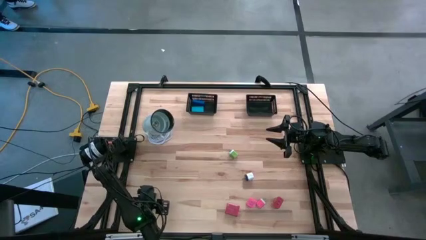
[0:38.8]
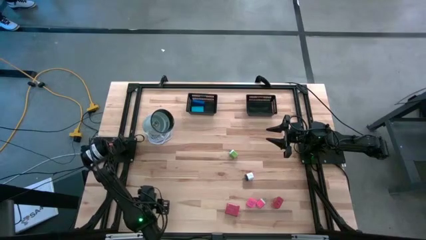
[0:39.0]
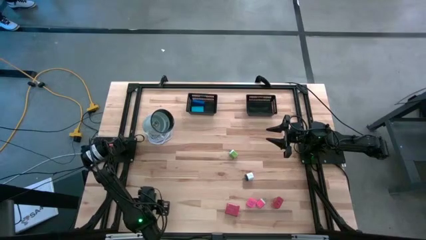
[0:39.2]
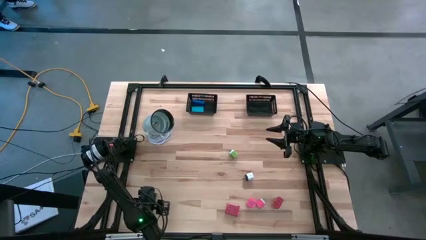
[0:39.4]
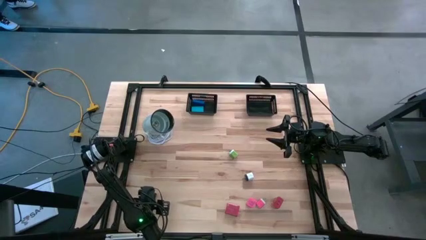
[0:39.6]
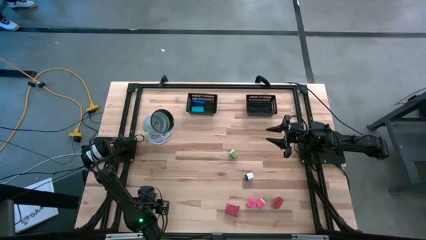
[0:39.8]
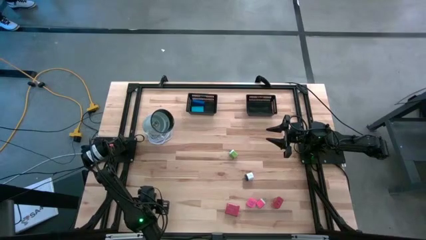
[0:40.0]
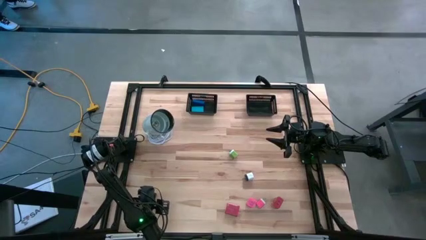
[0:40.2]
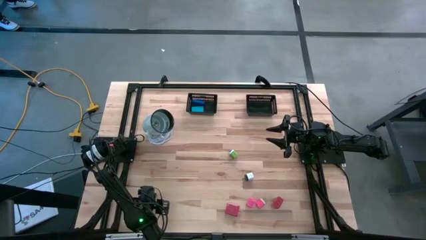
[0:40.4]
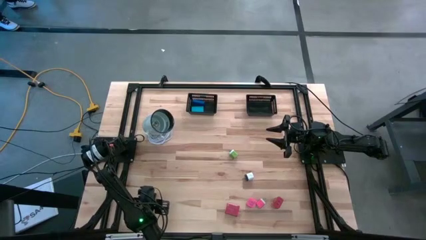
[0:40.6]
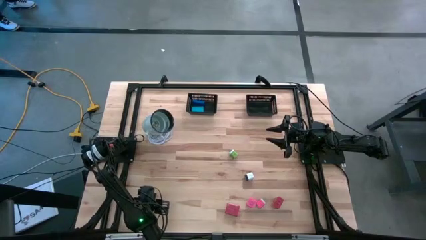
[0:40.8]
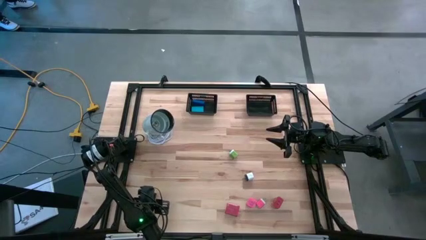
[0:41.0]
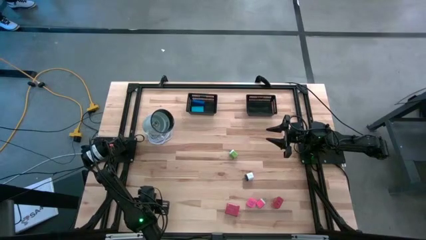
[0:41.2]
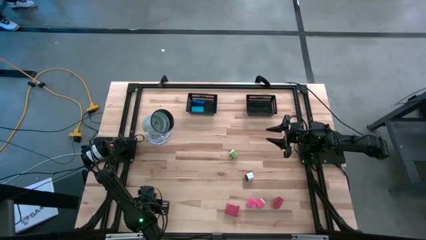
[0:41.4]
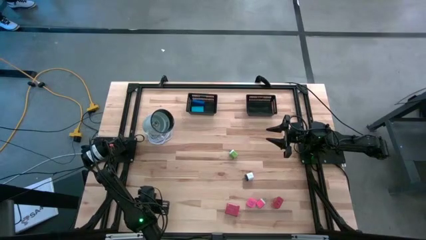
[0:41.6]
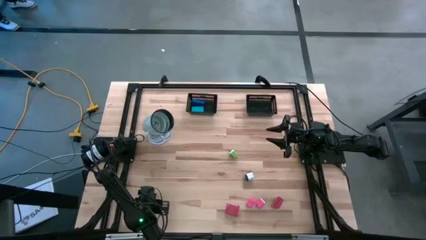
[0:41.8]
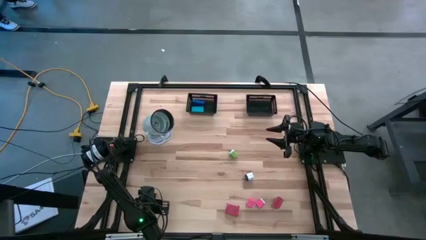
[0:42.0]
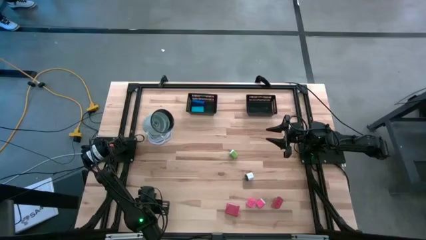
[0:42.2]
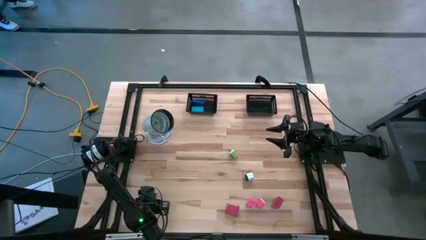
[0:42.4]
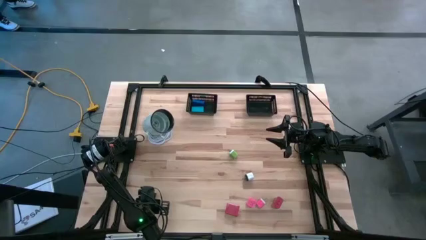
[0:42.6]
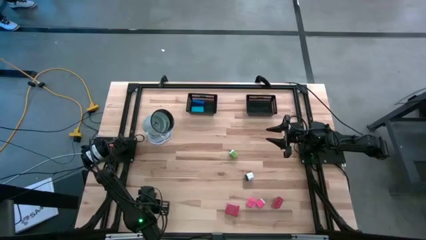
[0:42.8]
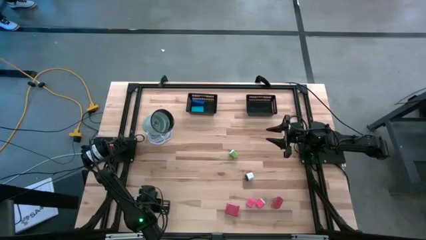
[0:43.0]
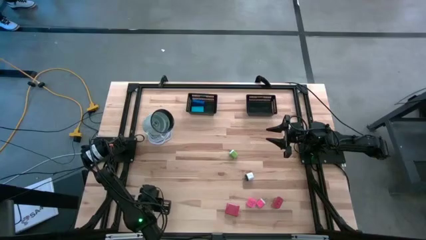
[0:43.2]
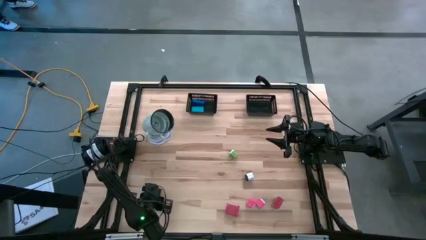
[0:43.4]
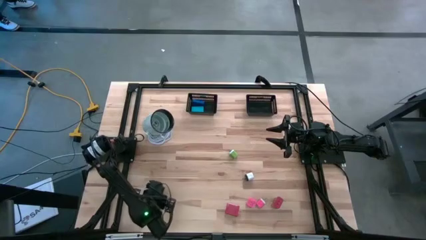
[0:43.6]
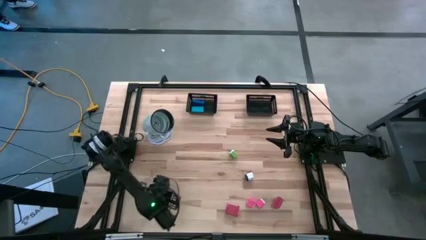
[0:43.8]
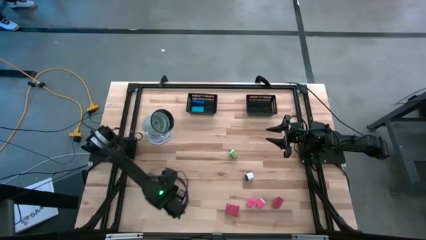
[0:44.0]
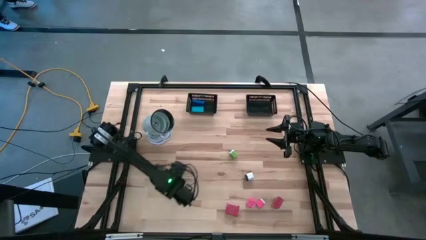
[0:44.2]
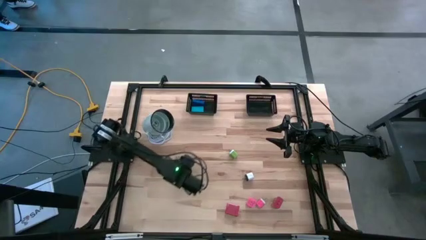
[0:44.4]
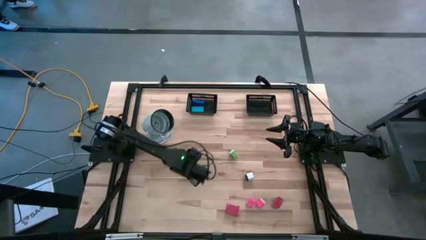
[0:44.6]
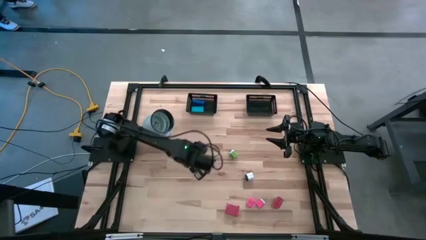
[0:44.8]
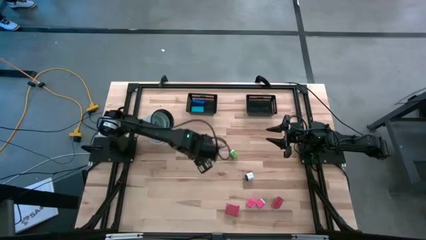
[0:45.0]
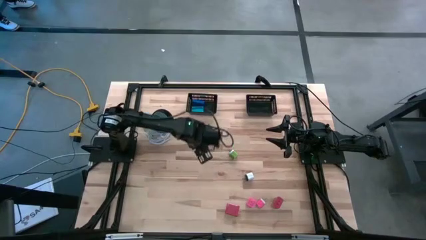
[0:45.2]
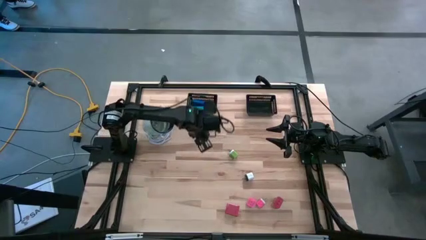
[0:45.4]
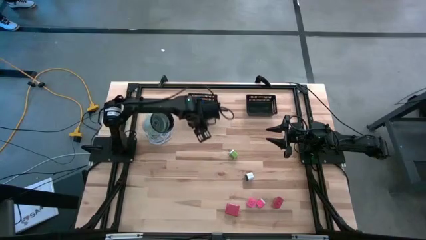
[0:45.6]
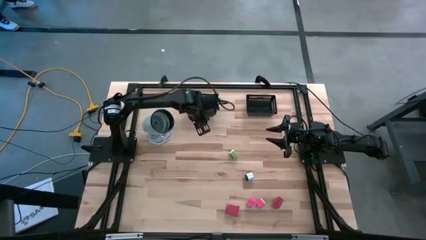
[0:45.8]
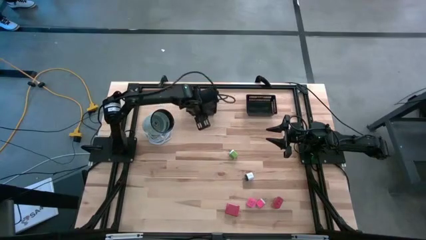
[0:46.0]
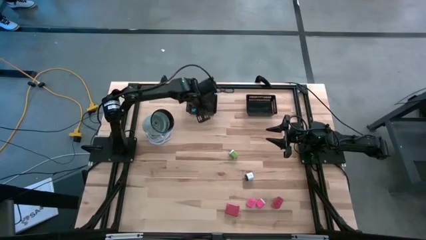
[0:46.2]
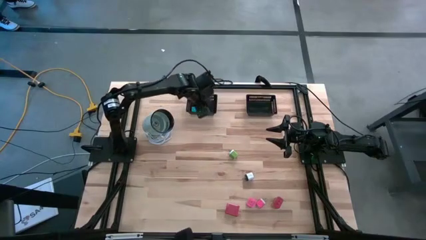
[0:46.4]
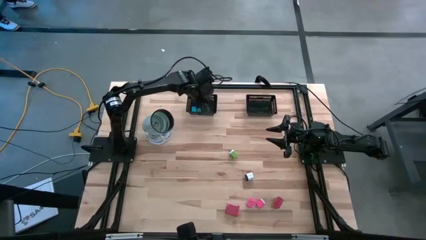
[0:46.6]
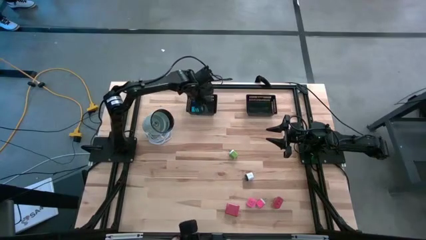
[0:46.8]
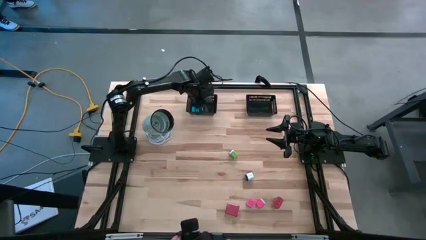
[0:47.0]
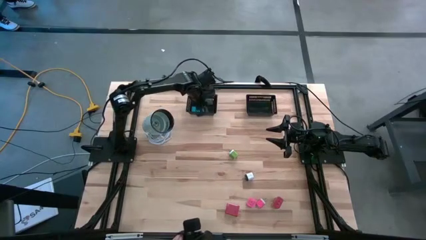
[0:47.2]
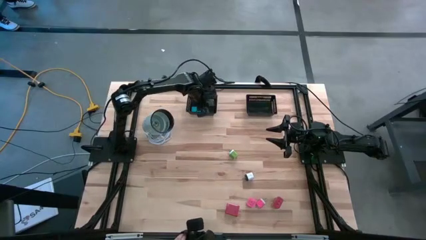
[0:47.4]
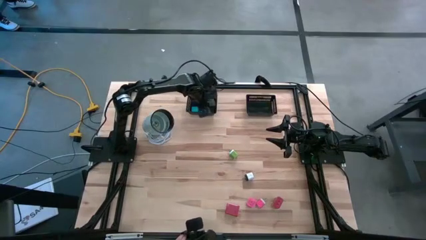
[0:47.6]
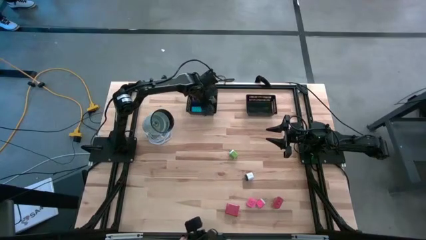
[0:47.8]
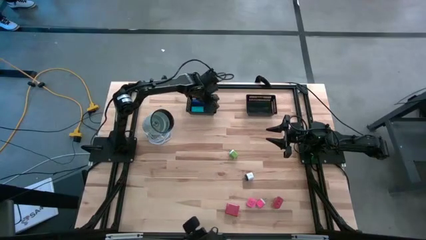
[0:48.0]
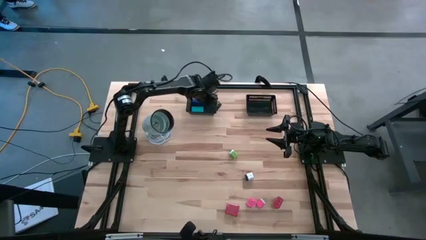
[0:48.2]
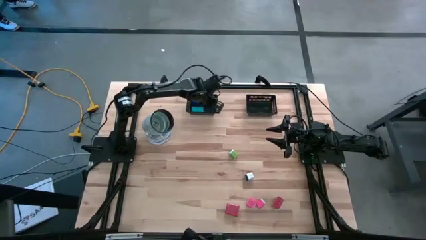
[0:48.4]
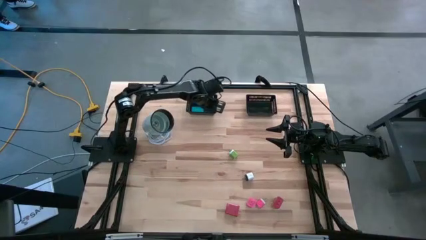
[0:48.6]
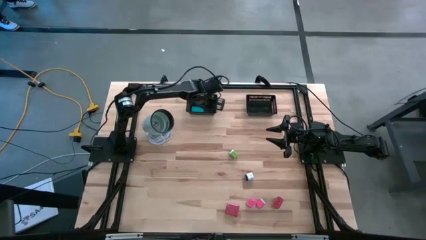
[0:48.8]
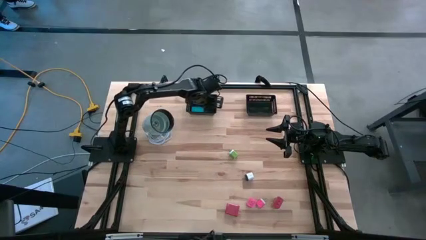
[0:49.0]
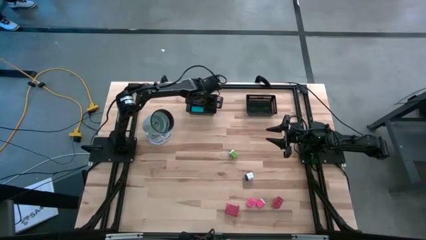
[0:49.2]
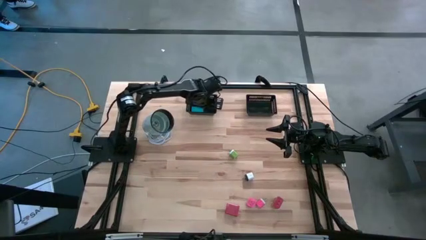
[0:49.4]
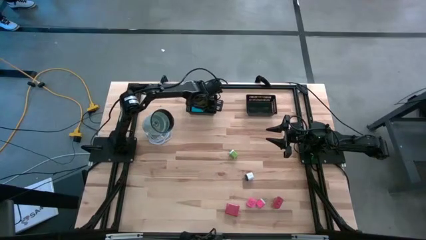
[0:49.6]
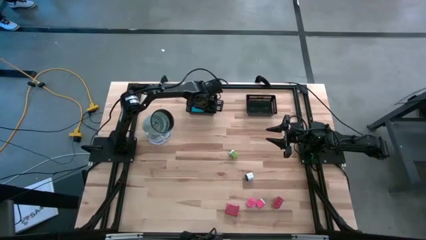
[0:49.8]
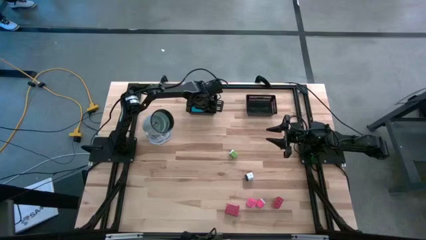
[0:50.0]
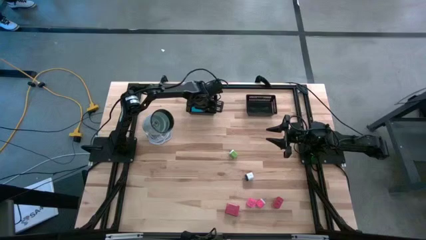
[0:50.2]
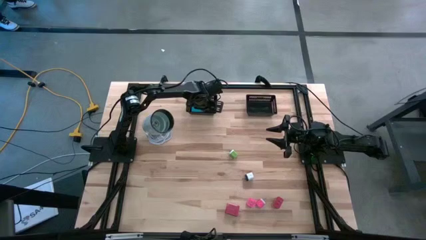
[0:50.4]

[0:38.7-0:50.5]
Task: Pick & Place Office items
Put the black digital clock into the left black bin

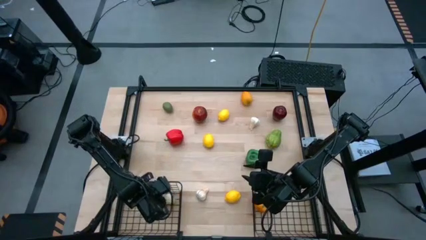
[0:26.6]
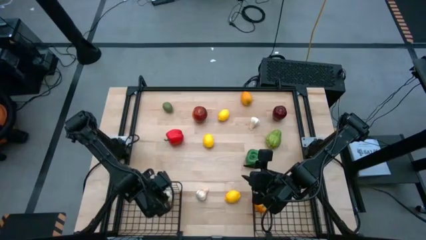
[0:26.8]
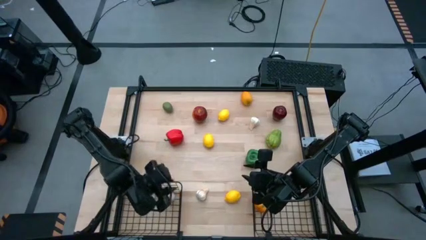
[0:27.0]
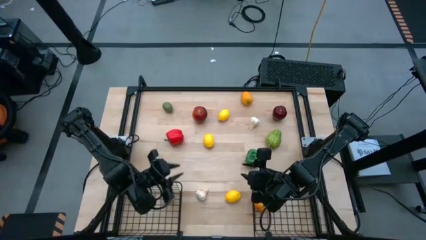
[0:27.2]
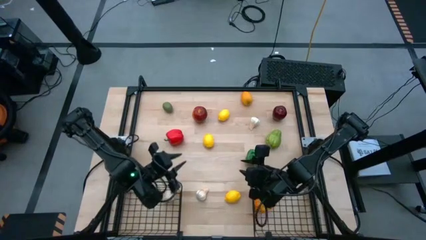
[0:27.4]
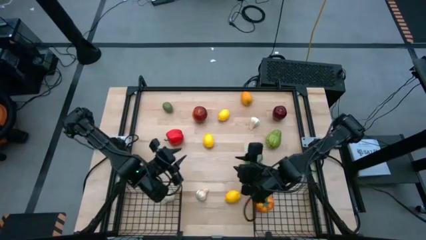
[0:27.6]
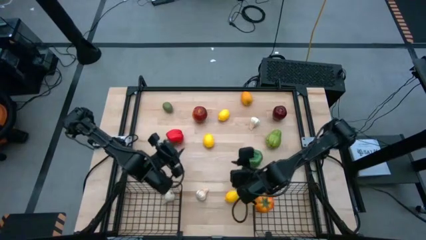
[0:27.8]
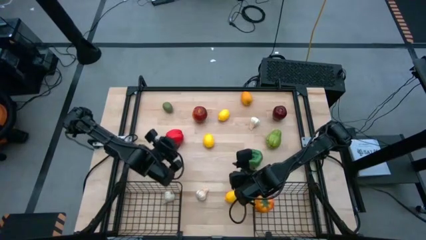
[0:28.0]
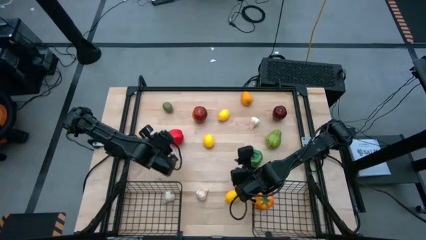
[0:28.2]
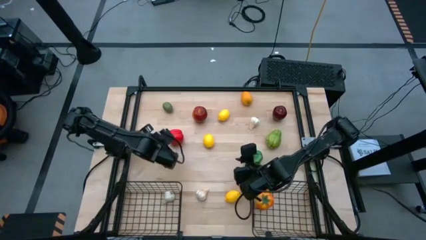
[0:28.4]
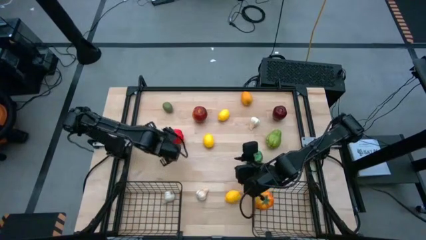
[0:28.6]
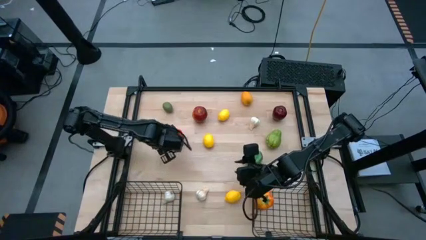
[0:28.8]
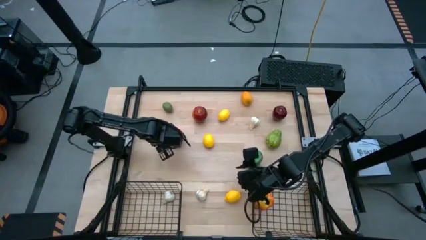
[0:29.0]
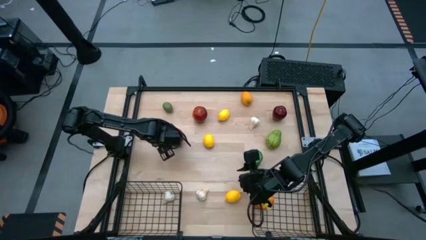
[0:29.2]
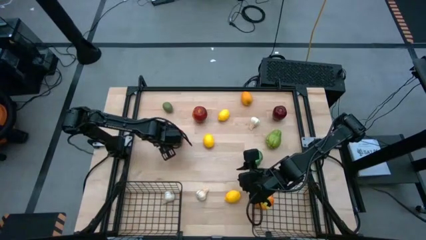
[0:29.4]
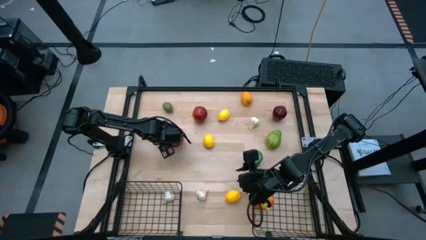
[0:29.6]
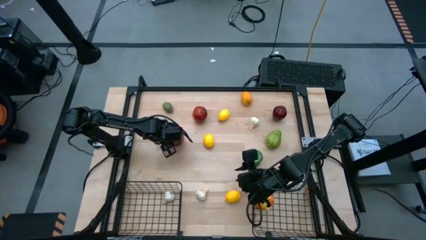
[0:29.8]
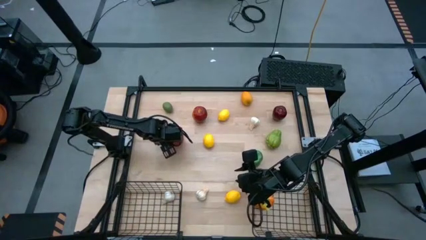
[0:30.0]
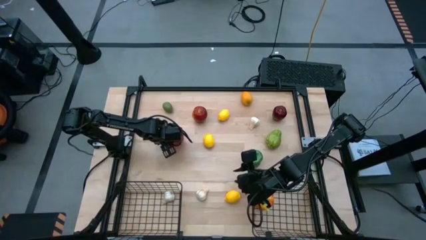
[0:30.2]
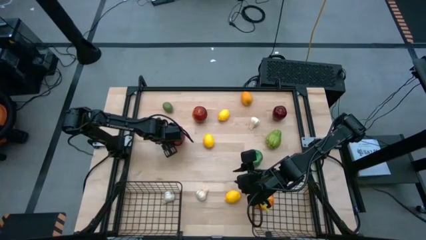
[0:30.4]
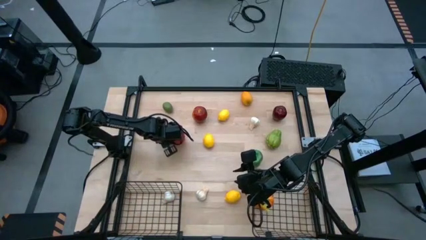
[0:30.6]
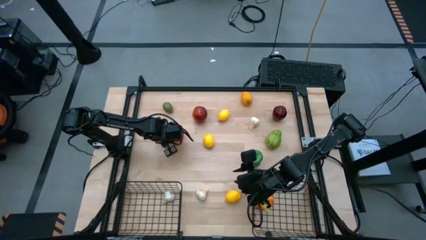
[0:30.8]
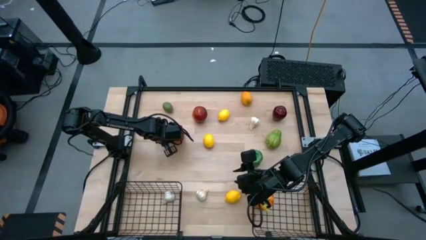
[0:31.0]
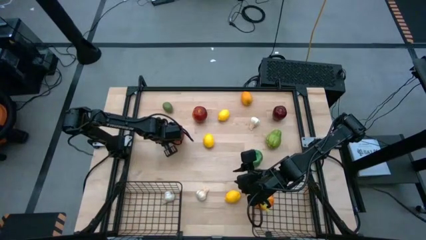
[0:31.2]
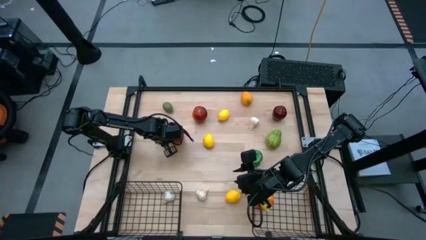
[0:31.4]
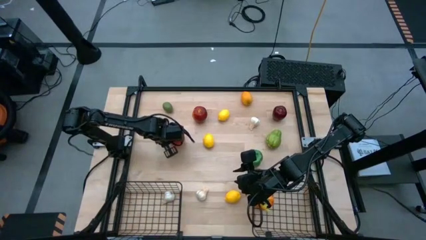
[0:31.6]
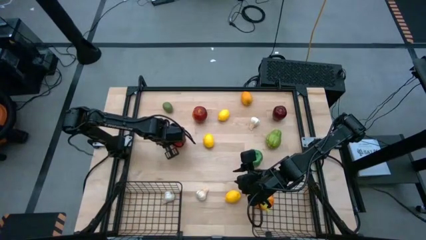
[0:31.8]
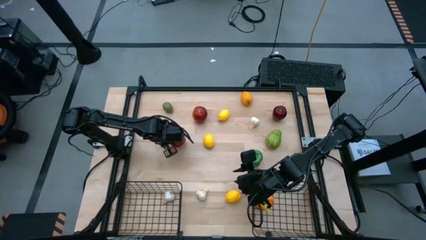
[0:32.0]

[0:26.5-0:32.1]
Task: Sort produce into baskets
Put the red bell pepper into the left black wire basket
